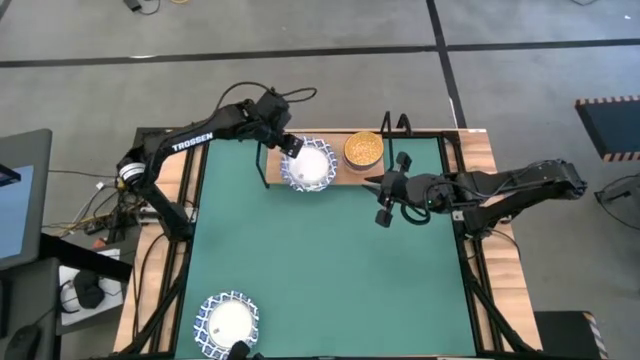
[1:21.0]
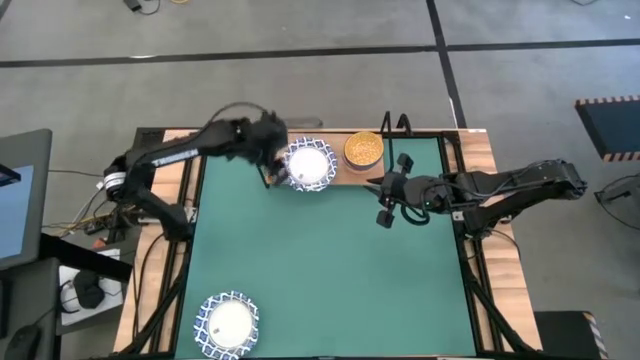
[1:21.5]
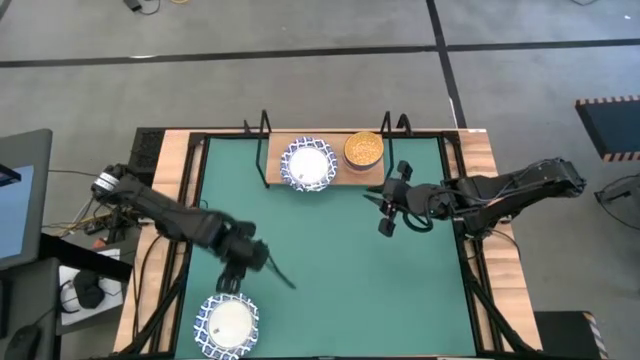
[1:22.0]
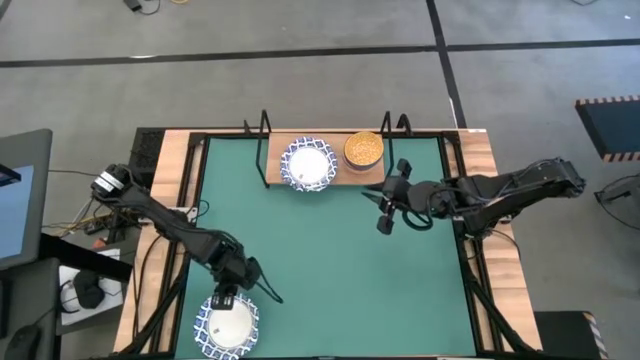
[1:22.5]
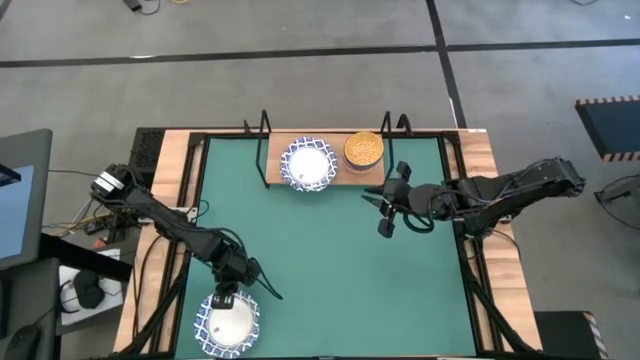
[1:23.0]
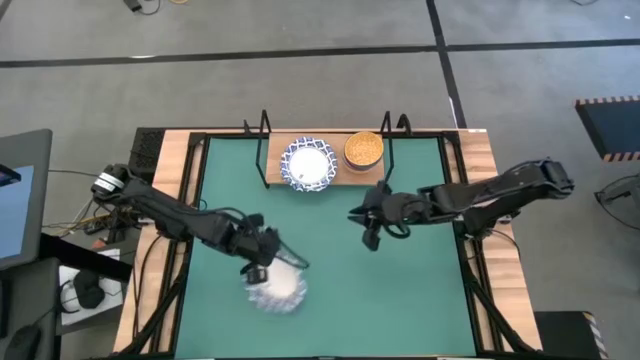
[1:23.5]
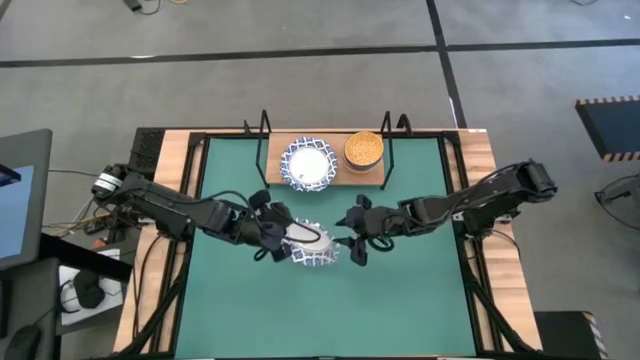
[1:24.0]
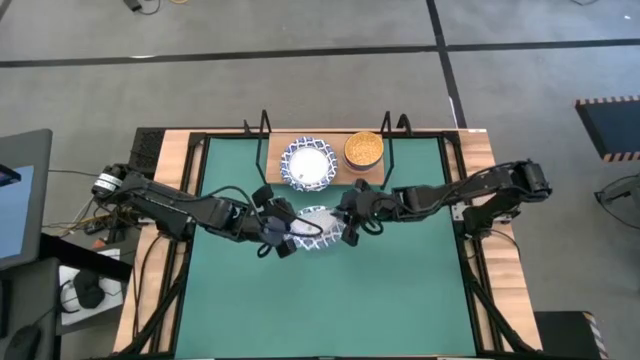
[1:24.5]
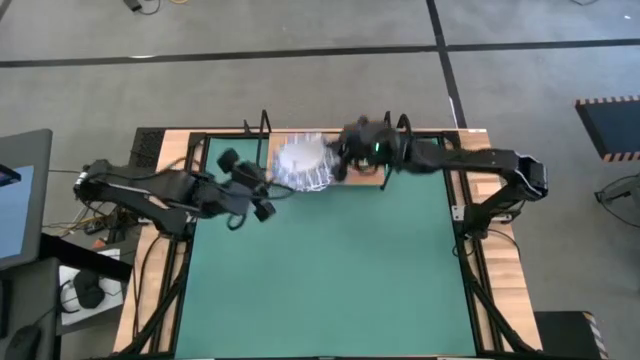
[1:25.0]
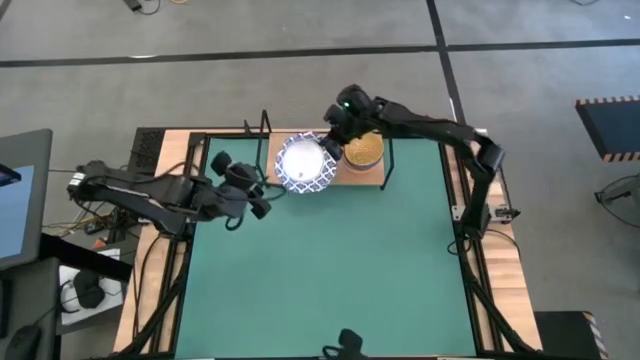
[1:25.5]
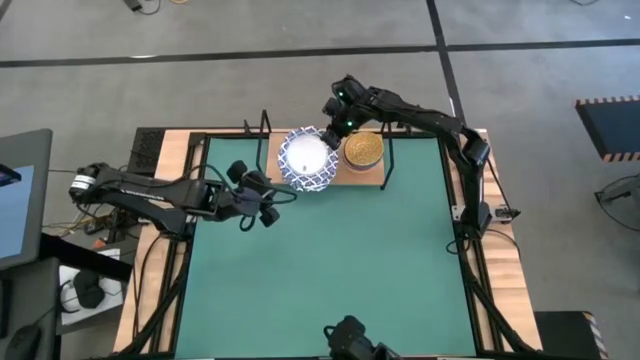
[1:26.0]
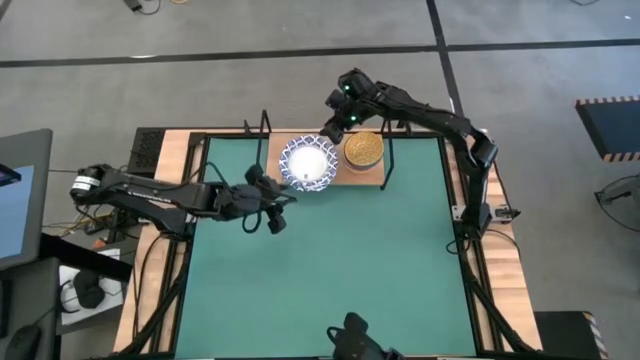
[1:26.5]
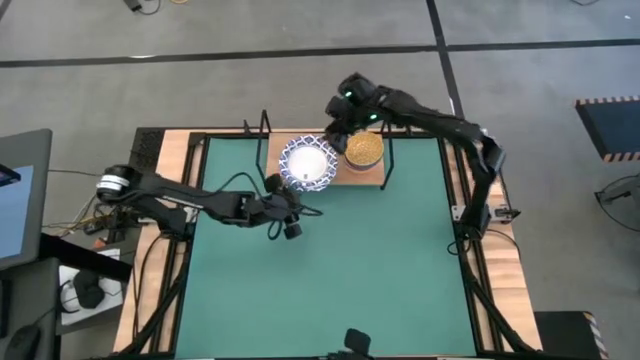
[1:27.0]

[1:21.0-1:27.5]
Task: Place and stack bowls onto a shelf
Stack the white patterned bowl on top of the white patterned bowl on the shelf

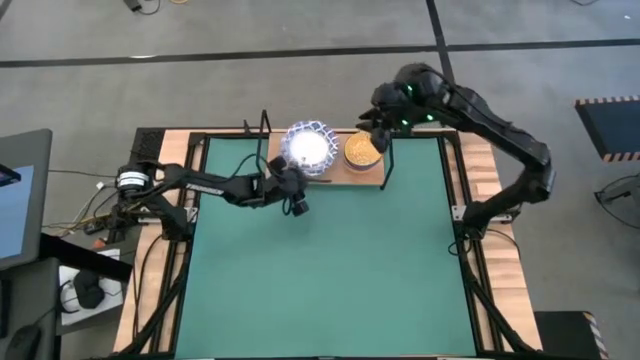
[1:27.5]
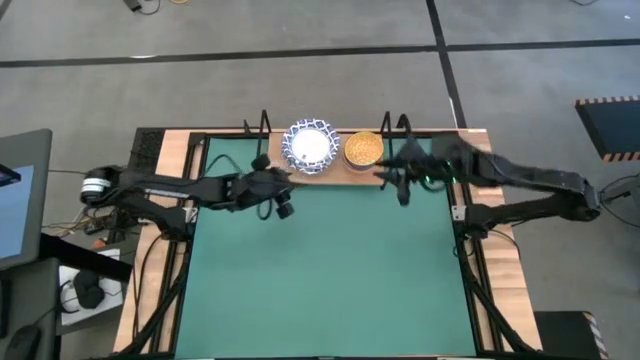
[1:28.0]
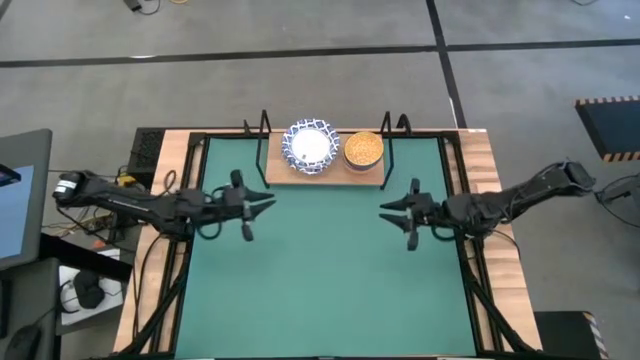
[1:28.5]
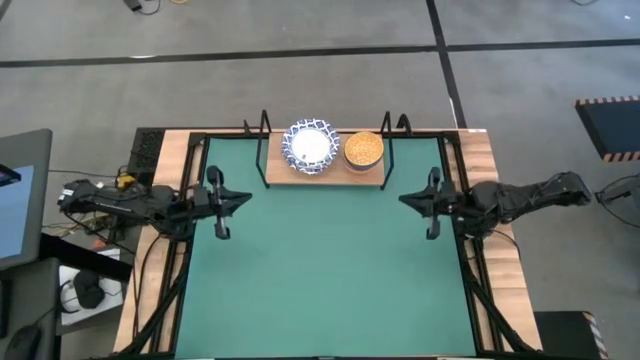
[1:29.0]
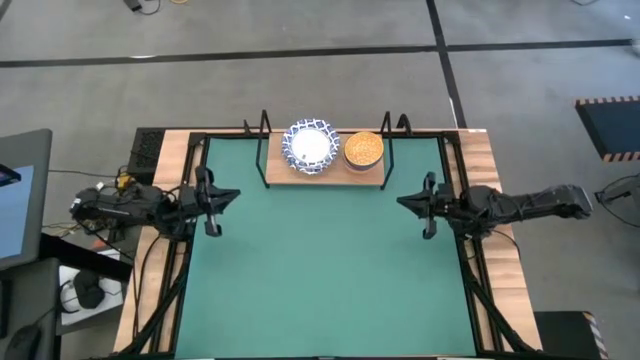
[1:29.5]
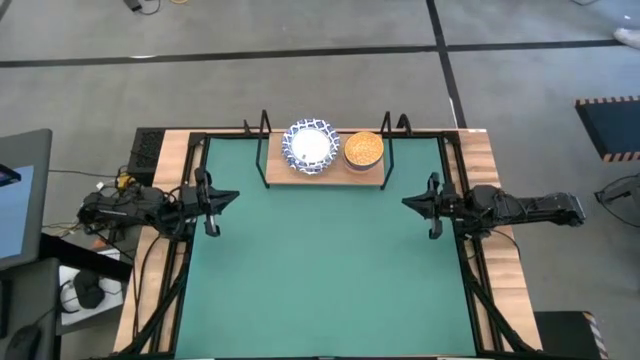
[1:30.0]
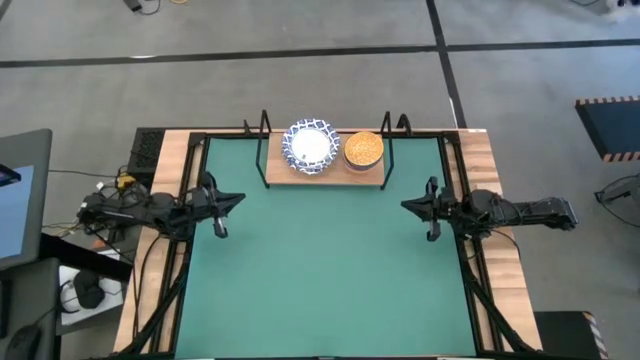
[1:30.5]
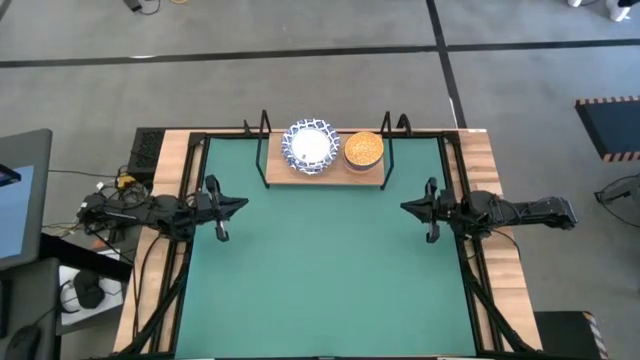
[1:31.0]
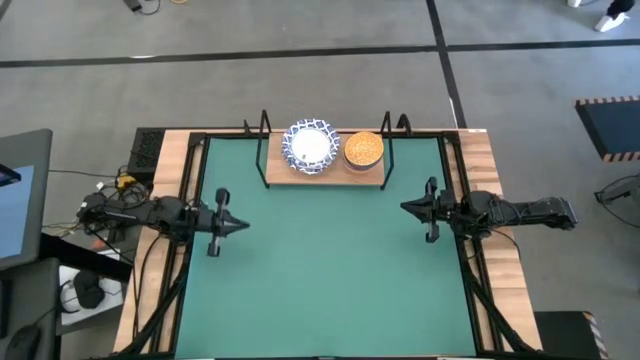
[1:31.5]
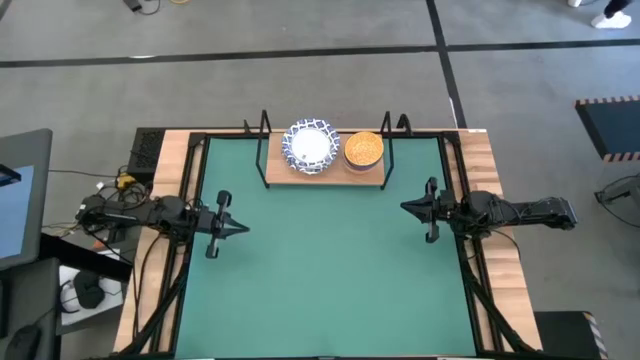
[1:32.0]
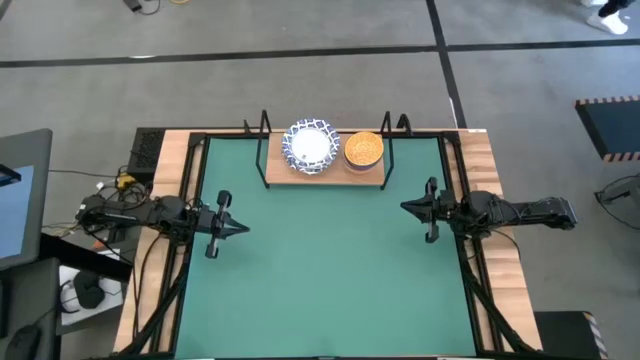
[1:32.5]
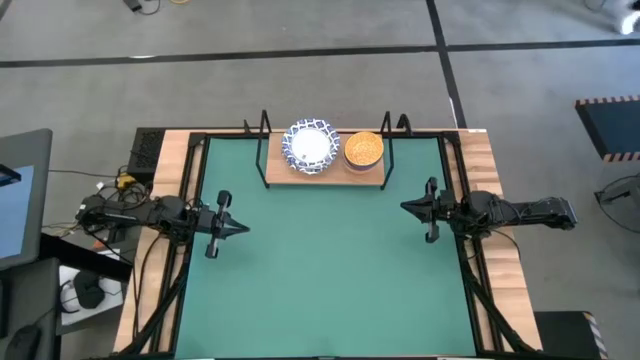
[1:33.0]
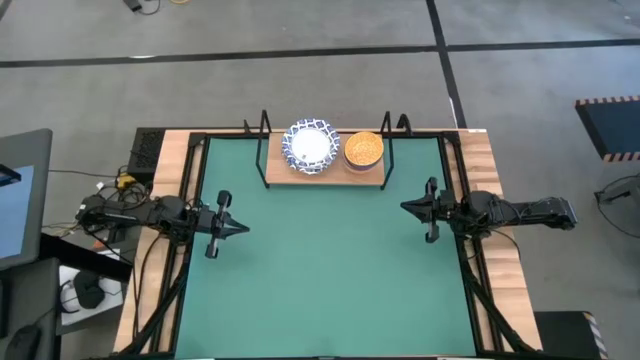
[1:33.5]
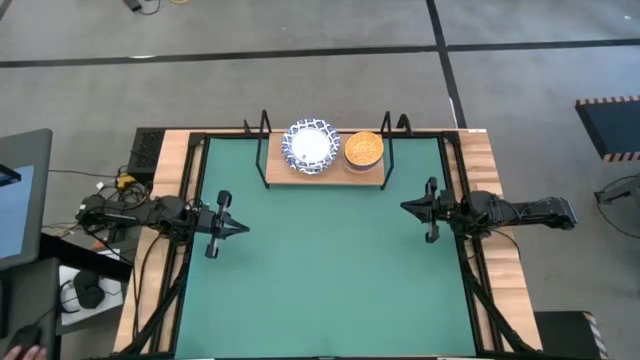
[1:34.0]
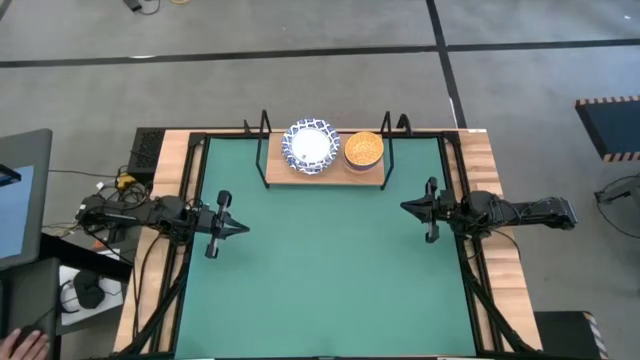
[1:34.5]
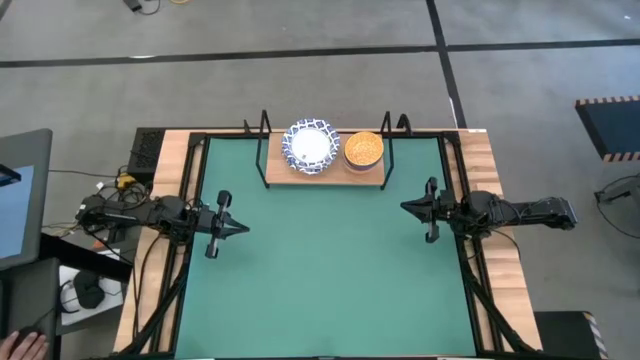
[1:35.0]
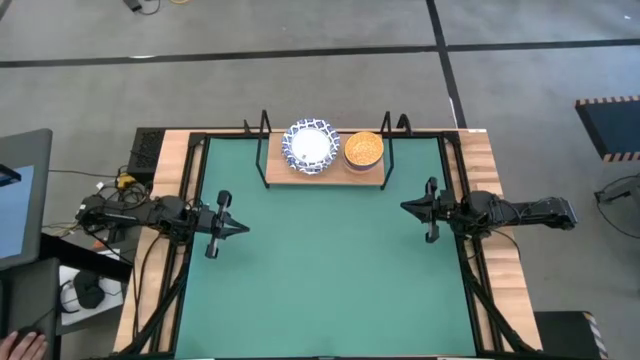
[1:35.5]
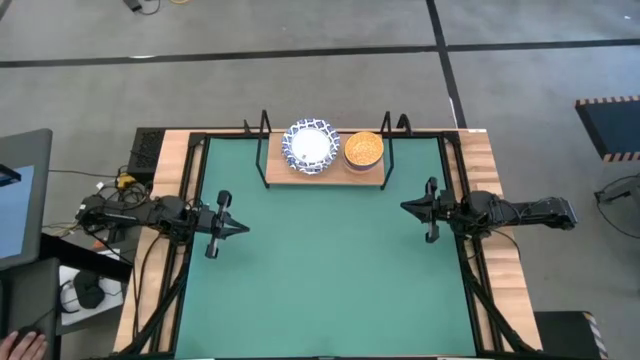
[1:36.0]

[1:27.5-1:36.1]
Return to Home Position

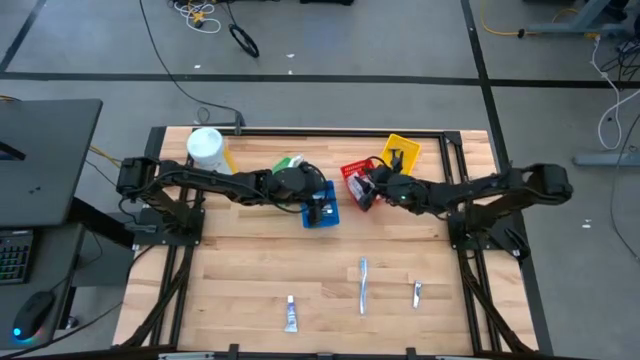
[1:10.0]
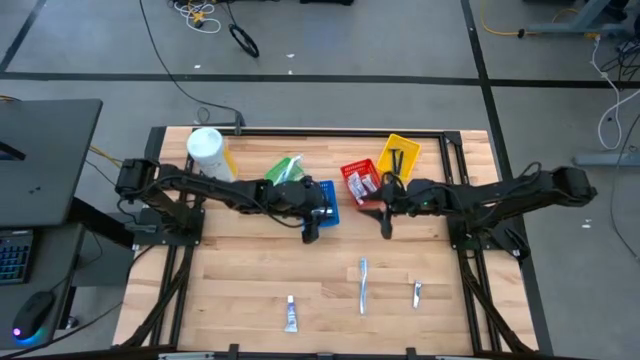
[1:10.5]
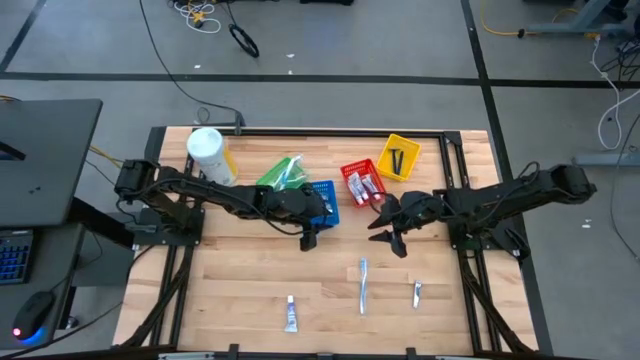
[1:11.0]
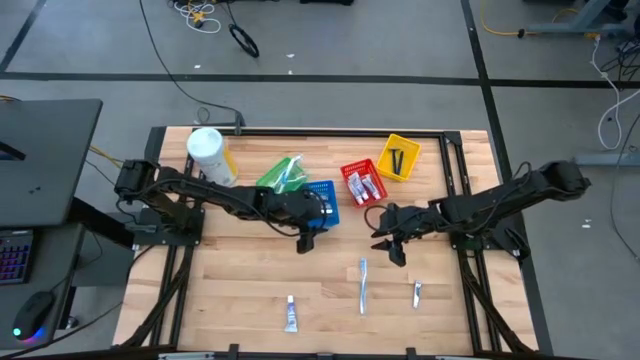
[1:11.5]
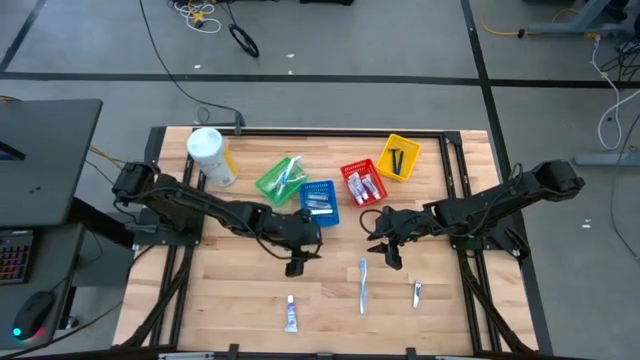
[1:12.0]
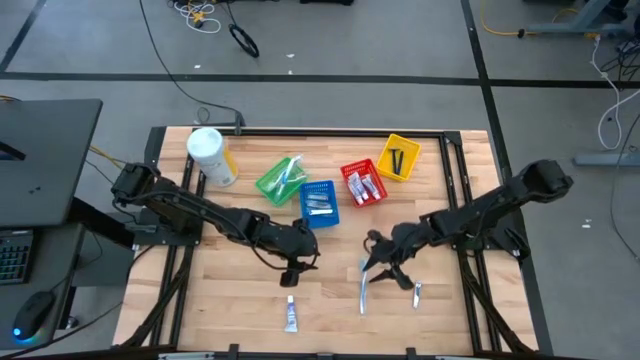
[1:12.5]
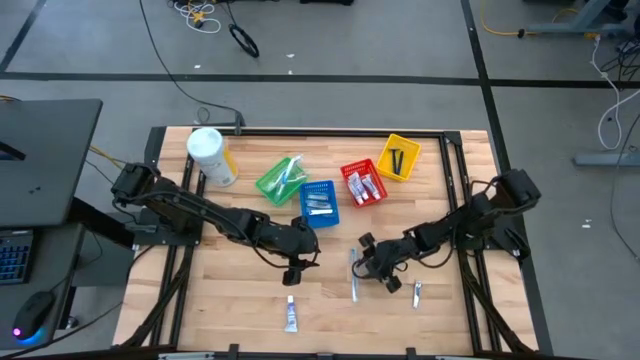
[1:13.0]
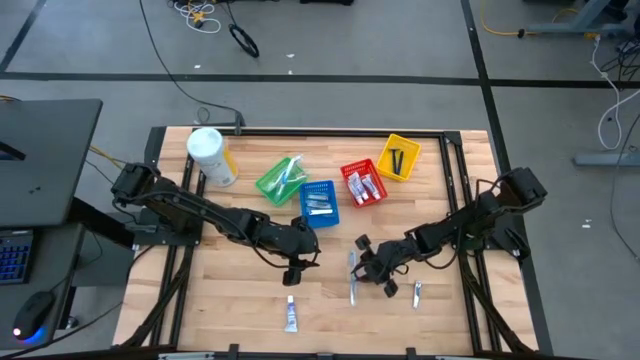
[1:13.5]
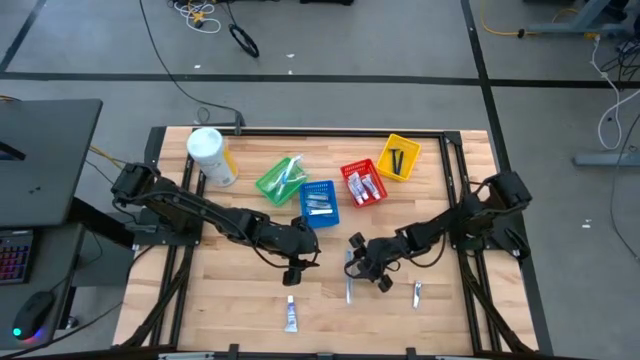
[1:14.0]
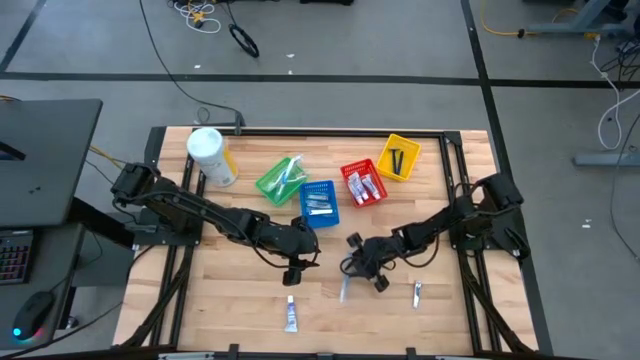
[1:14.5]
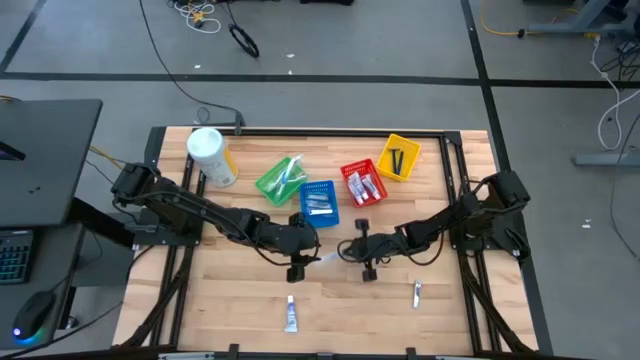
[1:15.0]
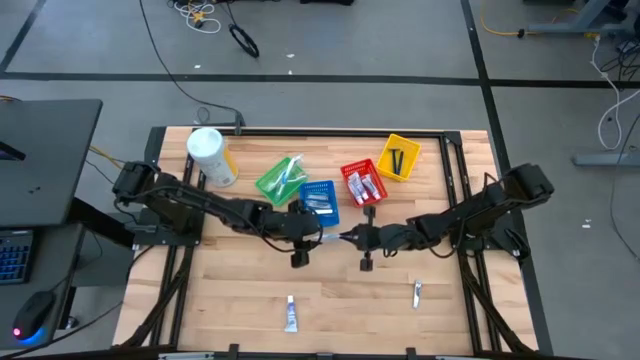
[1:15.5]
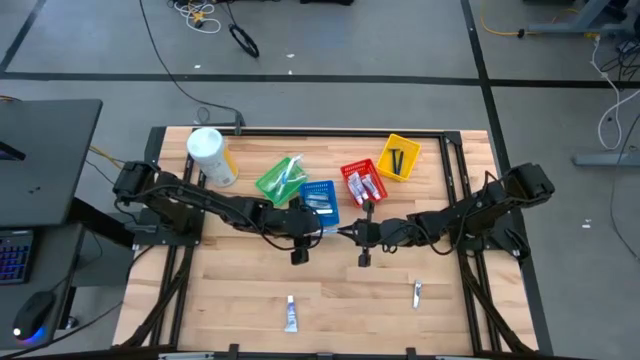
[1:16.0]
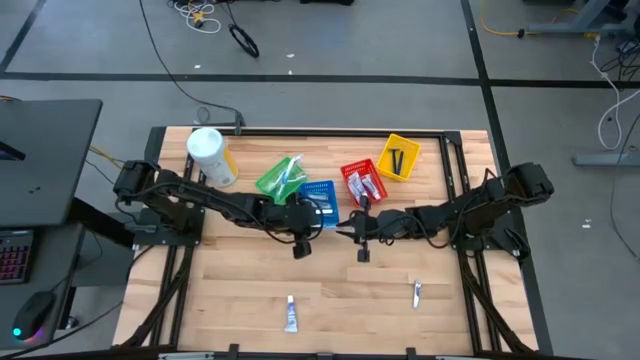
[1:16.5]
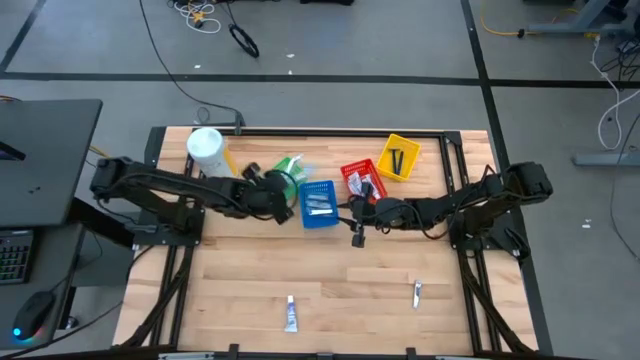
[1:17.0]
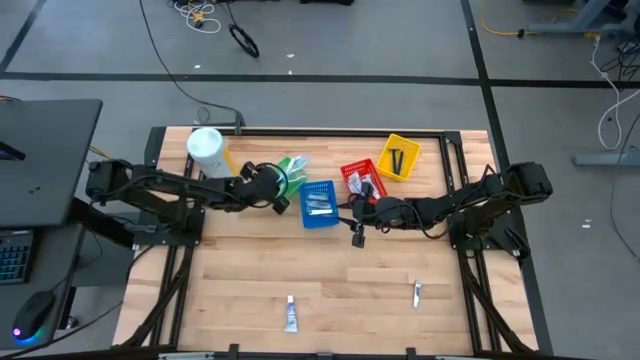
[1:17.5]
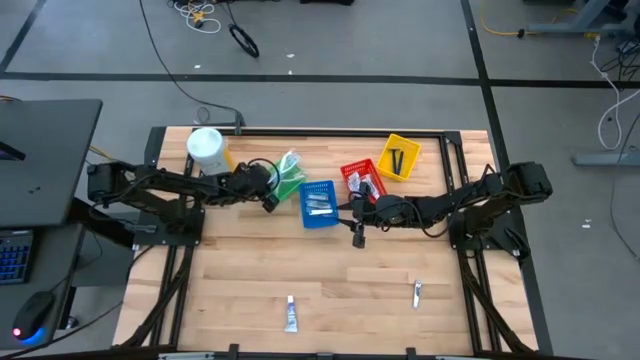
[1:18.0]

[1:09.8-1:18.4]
Task: Pick & Place Travel size toiletries
Put the blue toothbrush into the green bin
